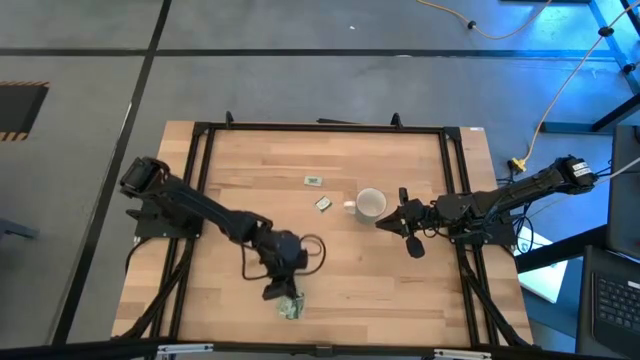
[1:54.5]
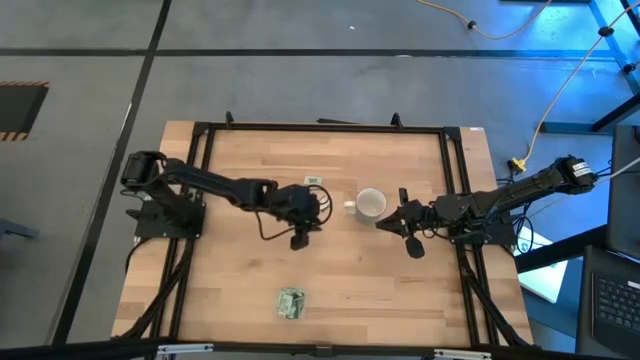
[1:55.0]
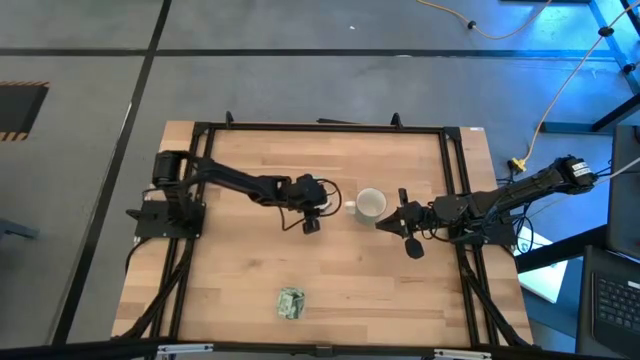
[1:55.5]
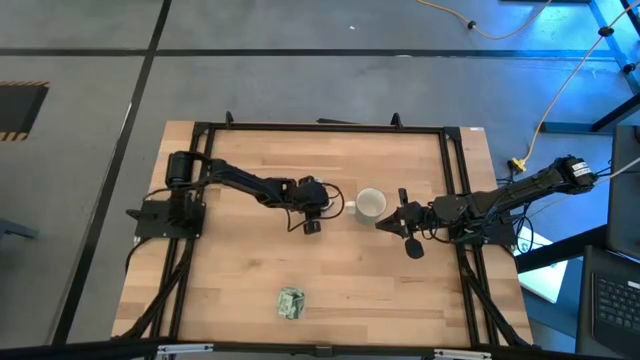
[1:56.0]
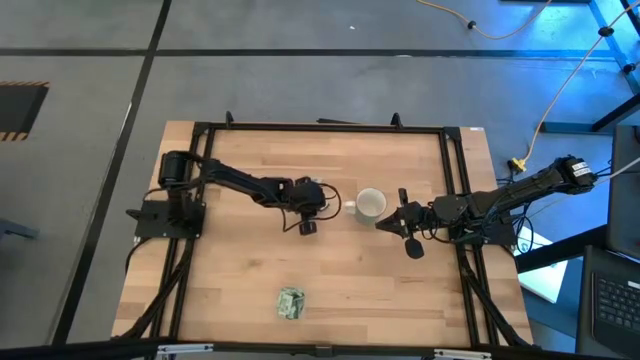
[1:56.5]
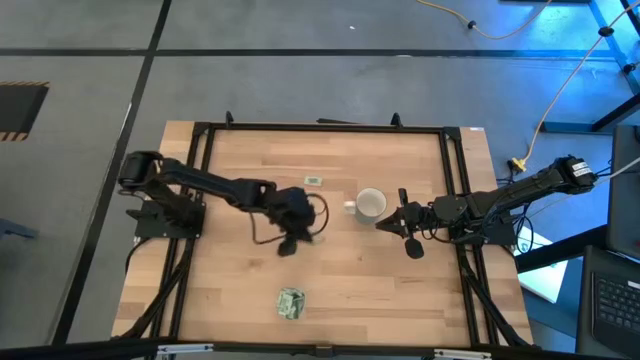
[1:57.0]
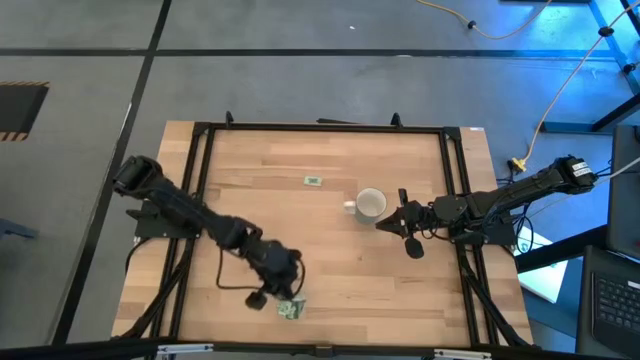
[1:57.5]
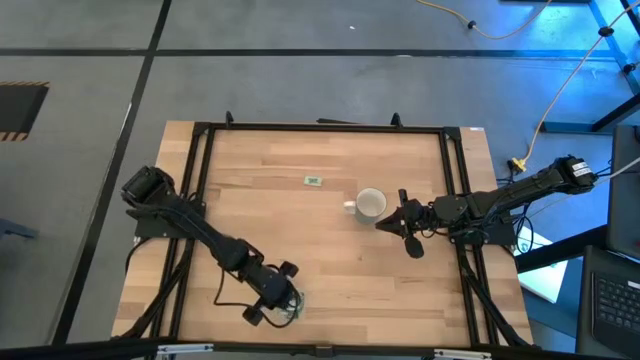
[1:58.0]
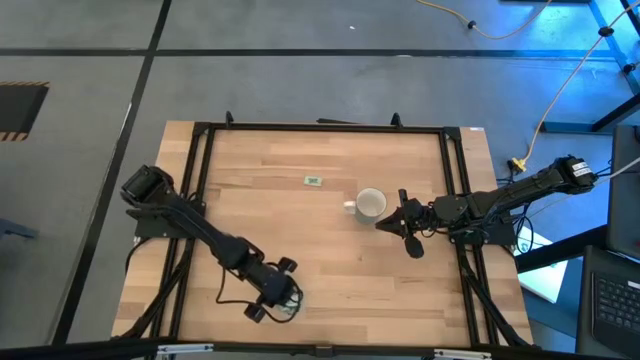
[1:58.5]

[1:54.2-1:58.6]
Task: Pick and place Stevia / Truvia into bins
Put the green stevia packet into the transparent bin

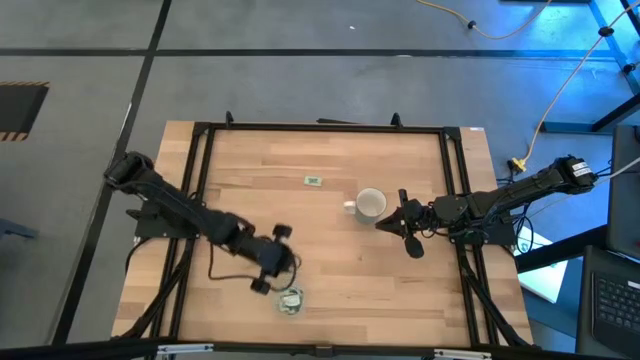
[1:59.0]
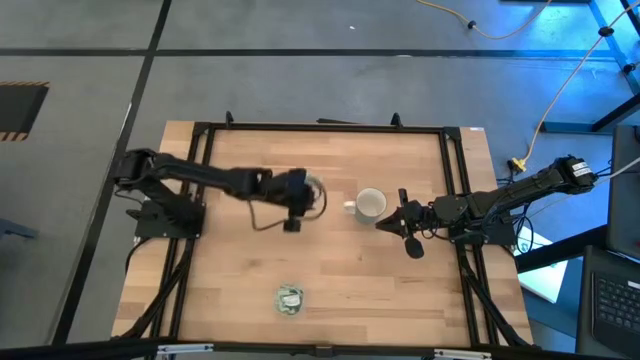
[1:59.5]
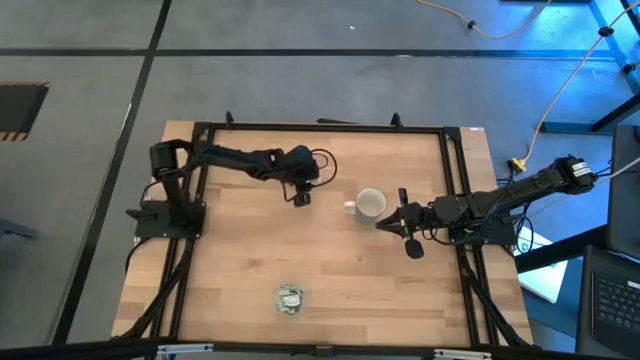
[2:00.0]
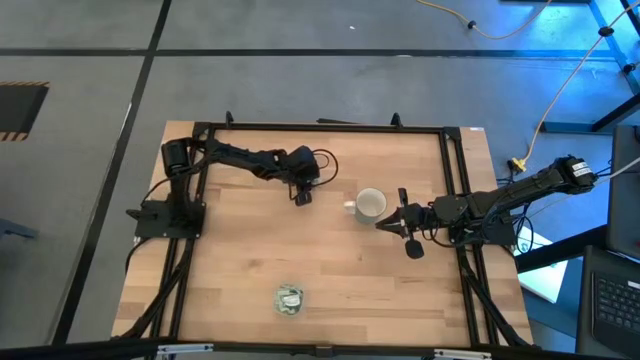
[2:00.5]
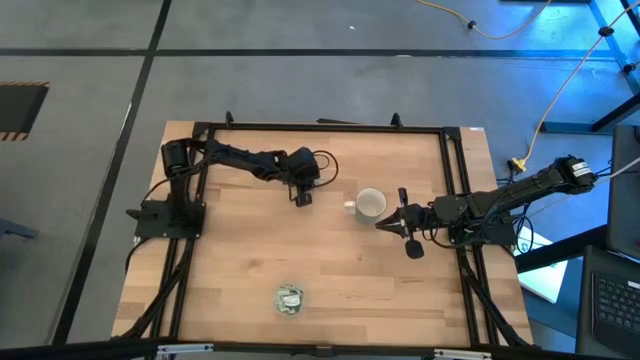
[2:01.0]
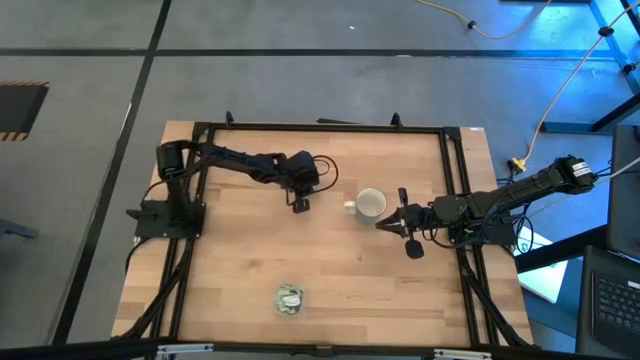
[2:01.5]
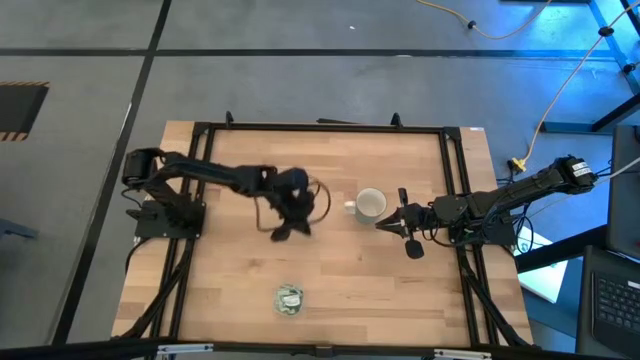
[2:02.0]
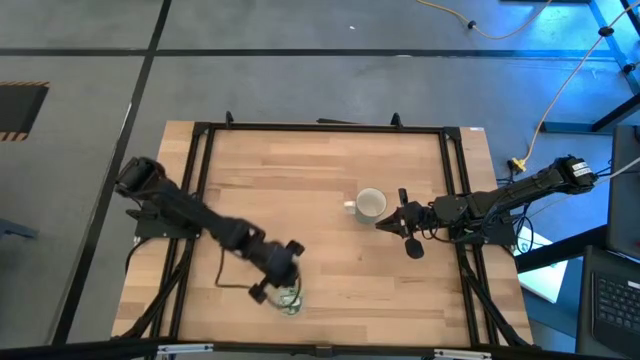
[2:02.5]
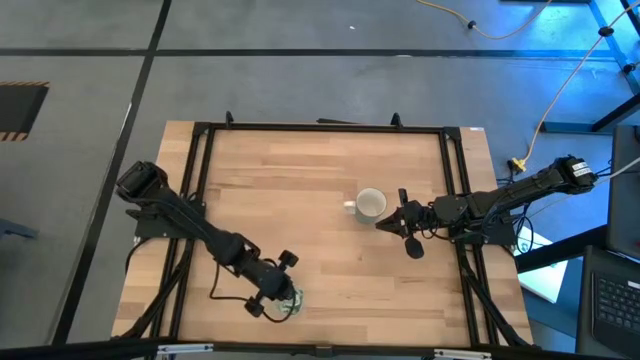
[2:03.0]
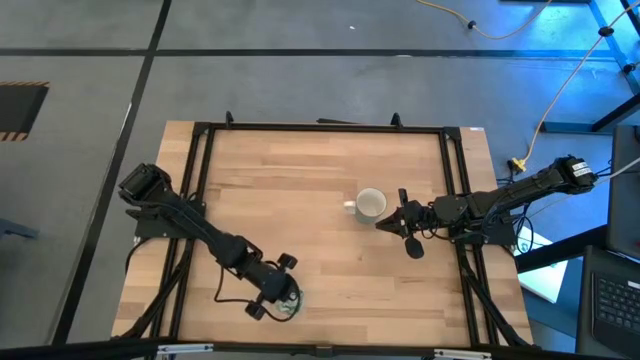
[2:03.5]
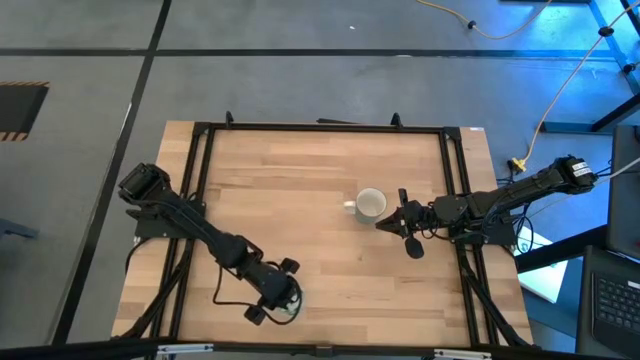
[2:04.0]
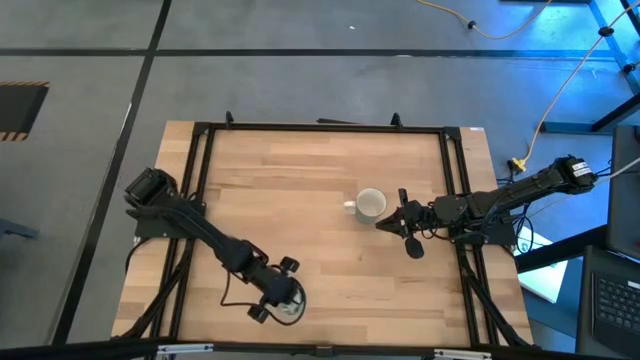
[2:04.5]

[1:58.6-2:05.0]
Put the light green stevia packet into the transparent bin

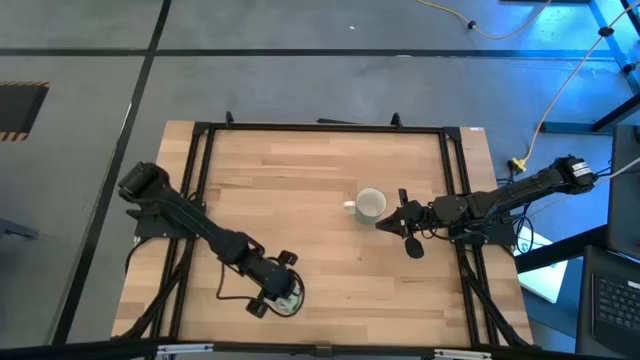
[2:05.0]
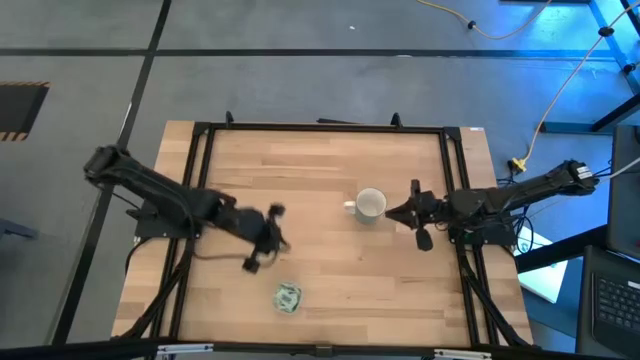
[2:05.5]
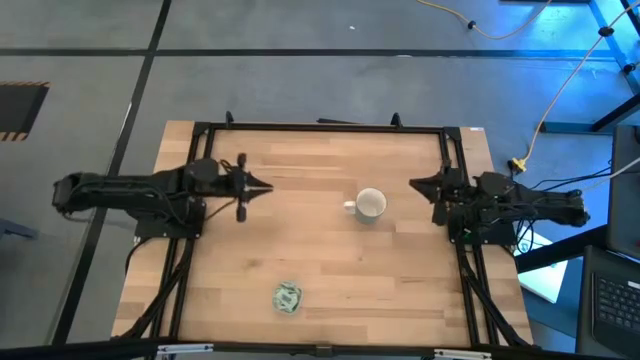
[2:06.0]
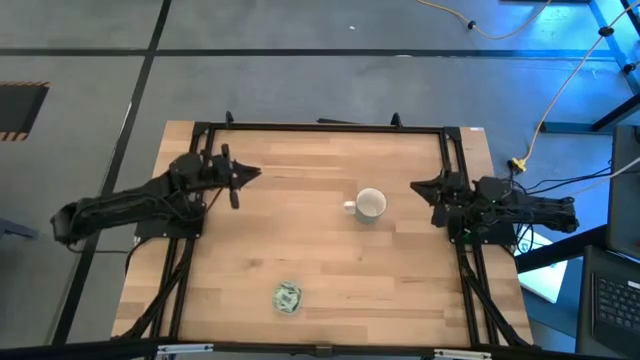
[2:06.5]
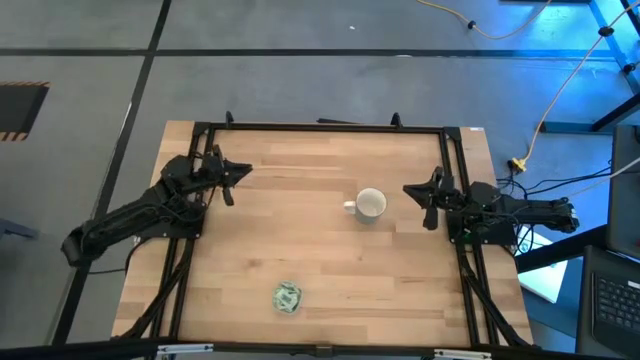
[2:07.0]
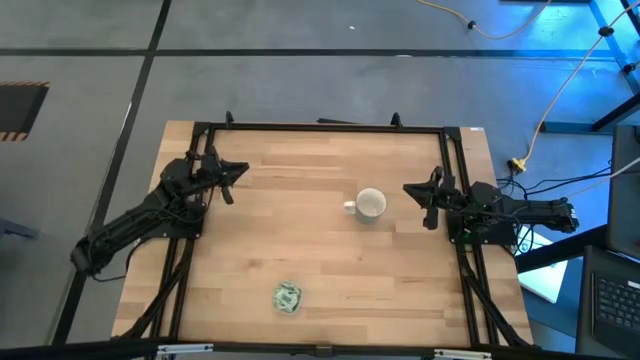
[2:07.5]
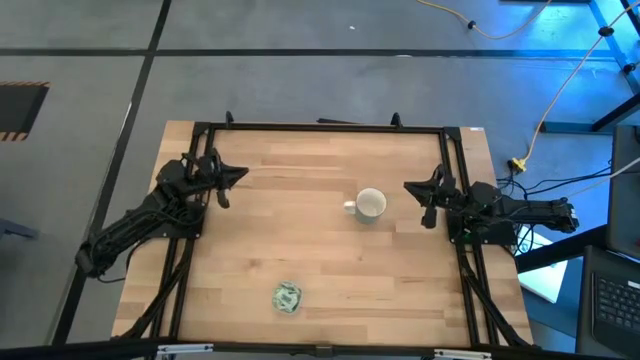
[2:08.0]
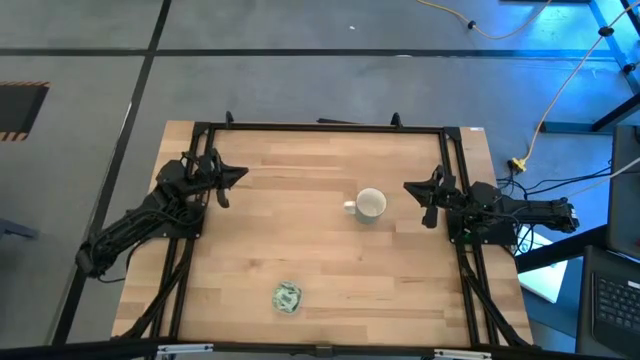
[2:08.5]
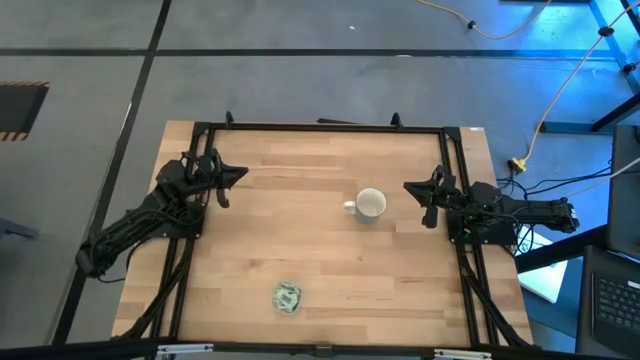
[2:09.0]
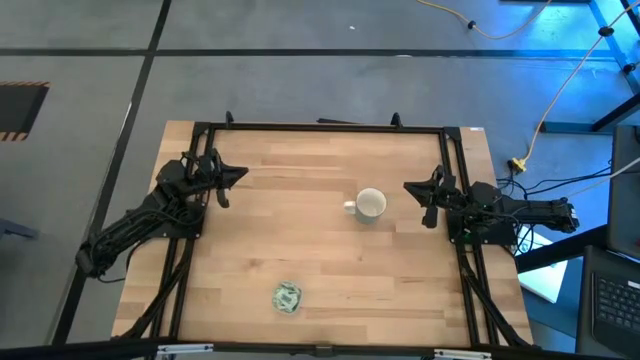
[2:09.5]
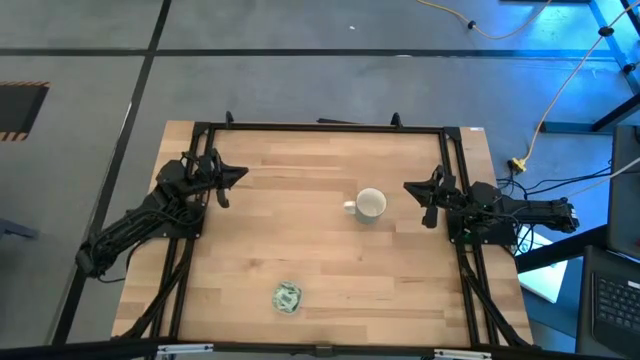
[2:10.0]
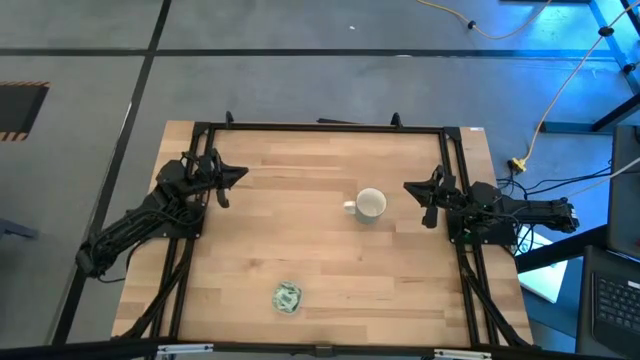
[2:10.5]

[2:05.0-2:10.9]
Return to Home Position

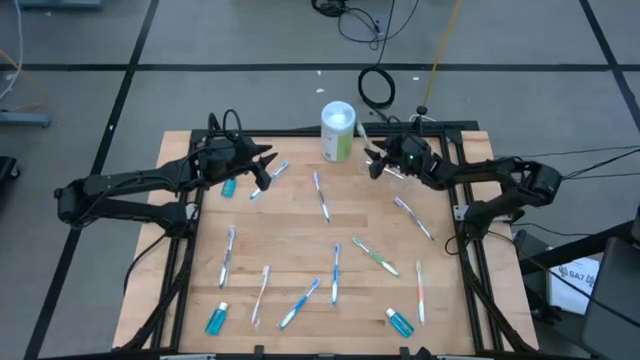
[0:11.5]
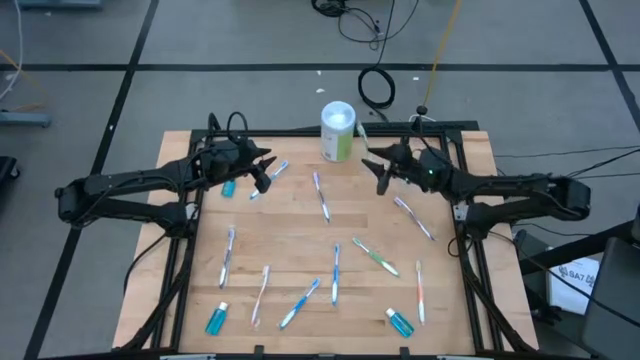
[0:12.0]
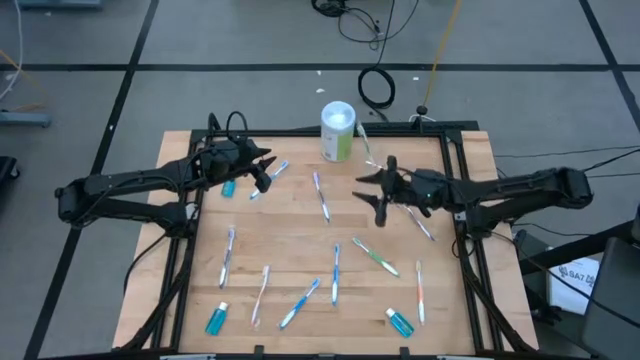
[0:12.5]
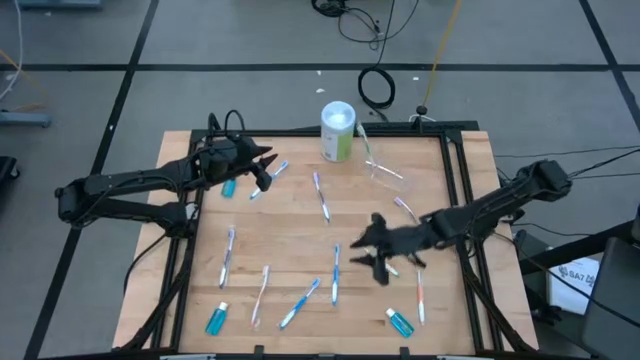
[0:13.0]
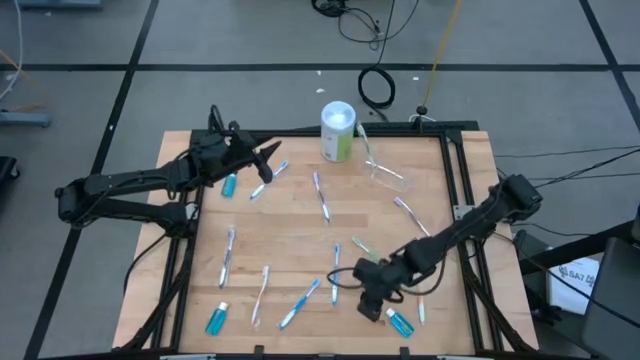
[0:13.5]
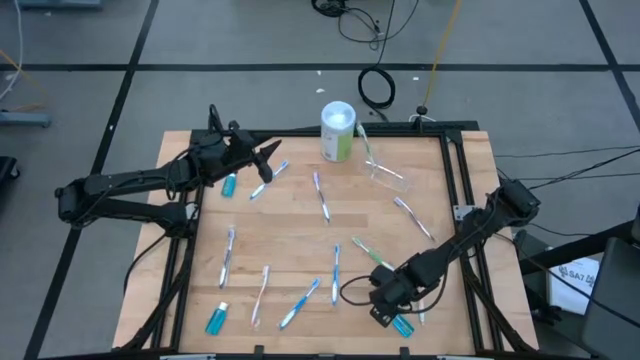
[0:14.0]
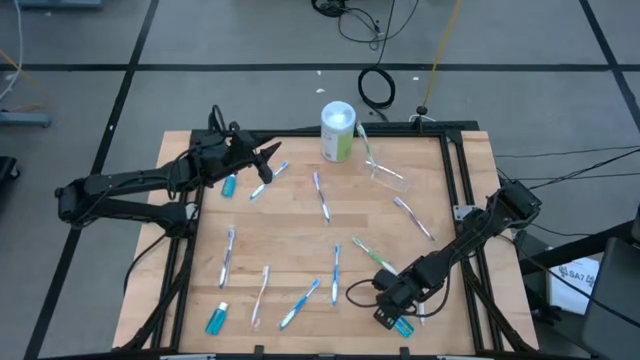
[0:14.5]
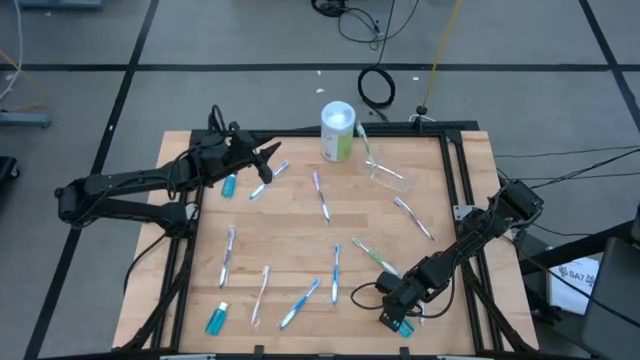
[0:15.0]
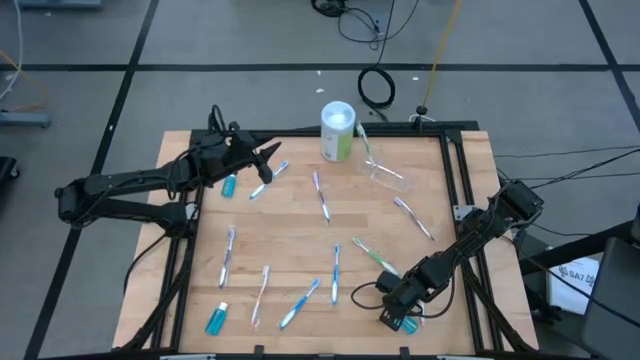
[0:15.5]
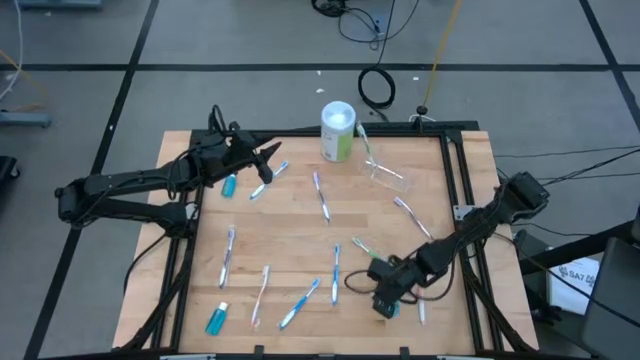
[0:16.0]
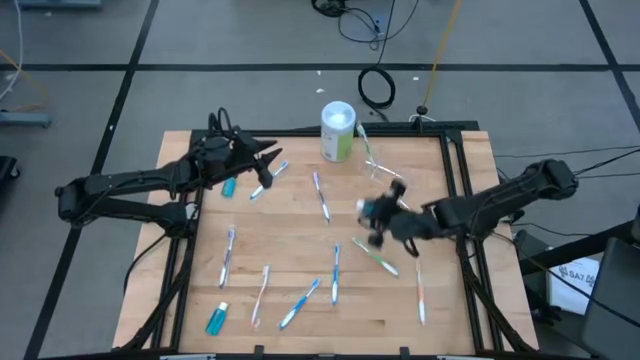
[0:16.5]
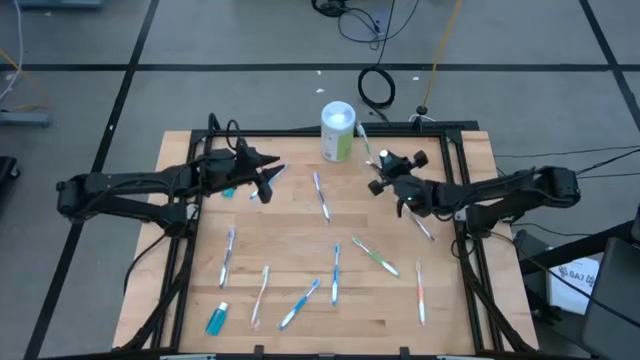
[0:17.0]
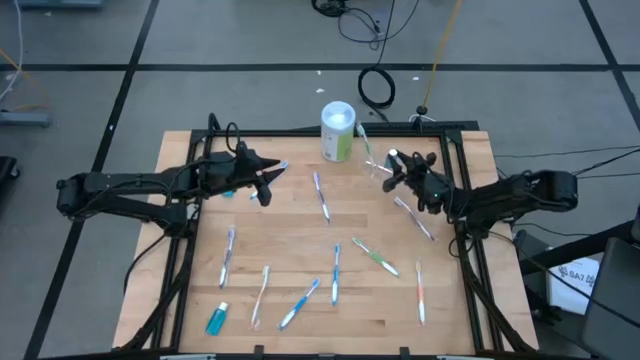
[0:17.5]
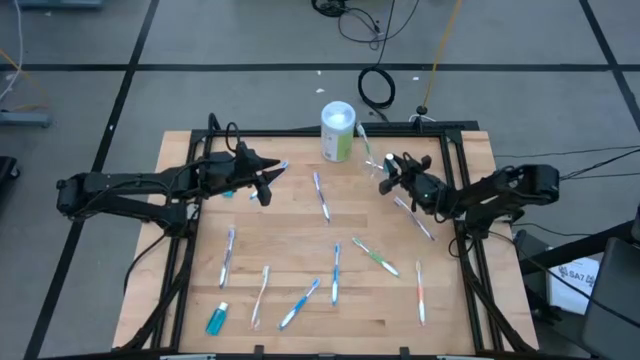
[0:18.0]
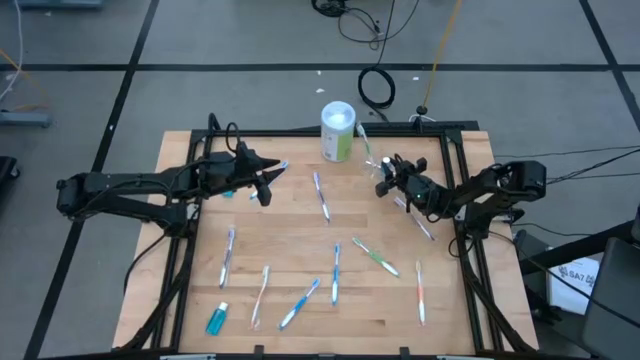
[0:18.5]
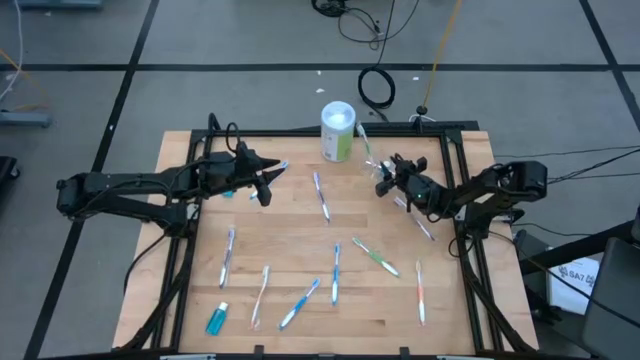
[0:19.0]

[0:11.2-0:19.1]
Task: Pick & Place toothbrushing station
Put the bottom right blue mouthwash into the transparent organizer
